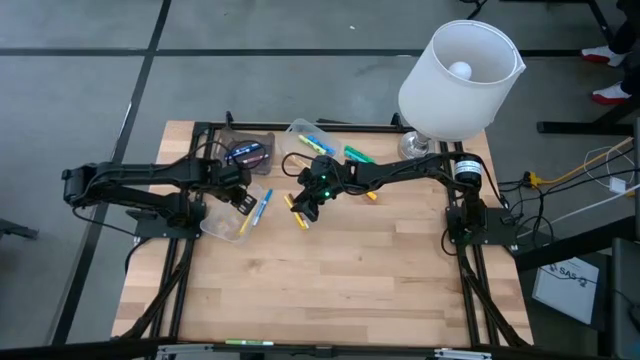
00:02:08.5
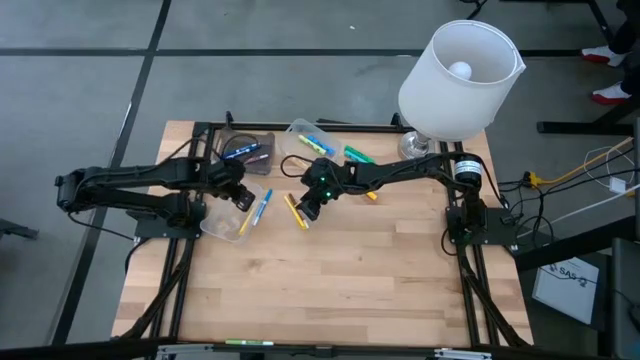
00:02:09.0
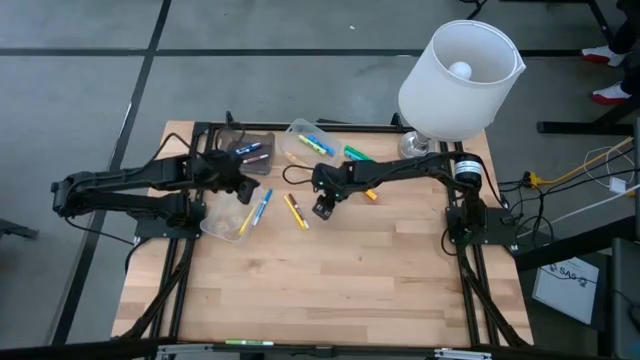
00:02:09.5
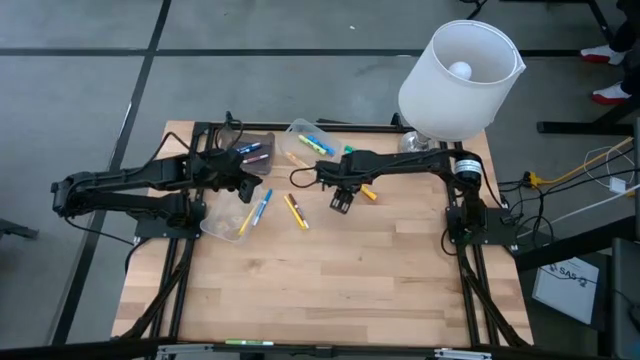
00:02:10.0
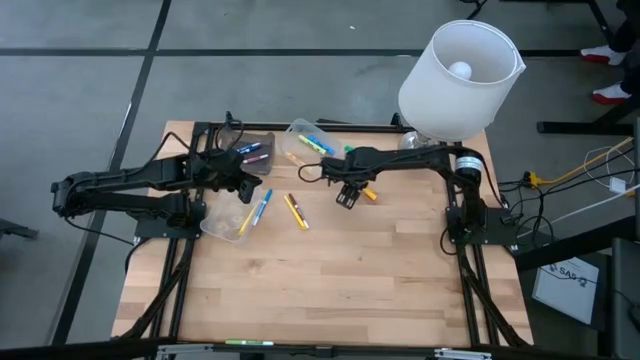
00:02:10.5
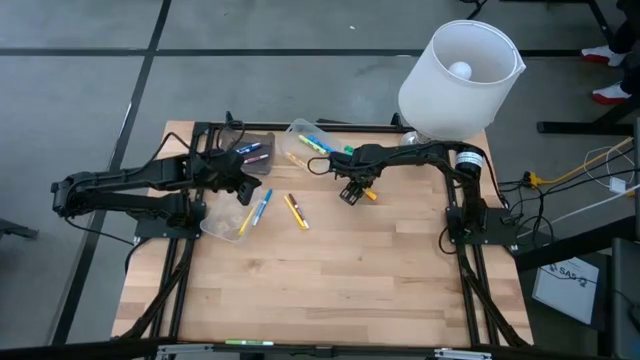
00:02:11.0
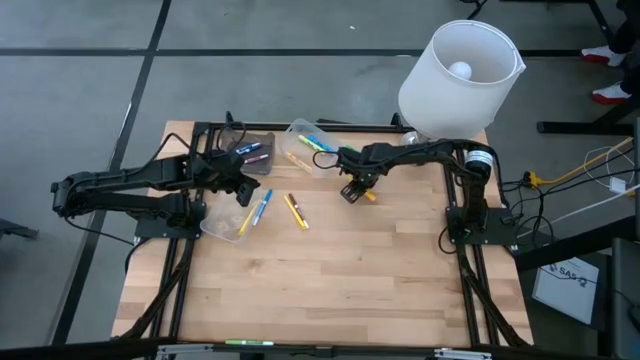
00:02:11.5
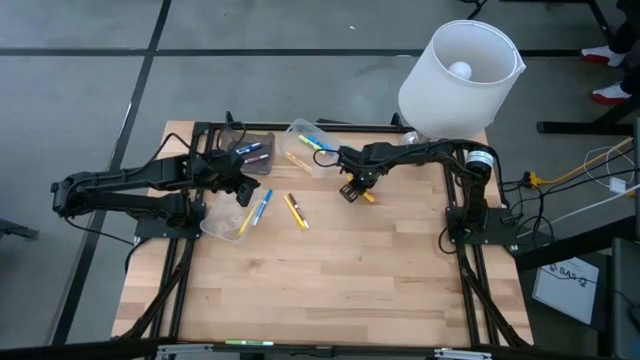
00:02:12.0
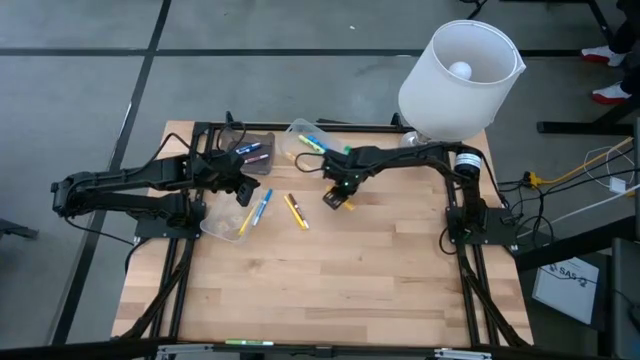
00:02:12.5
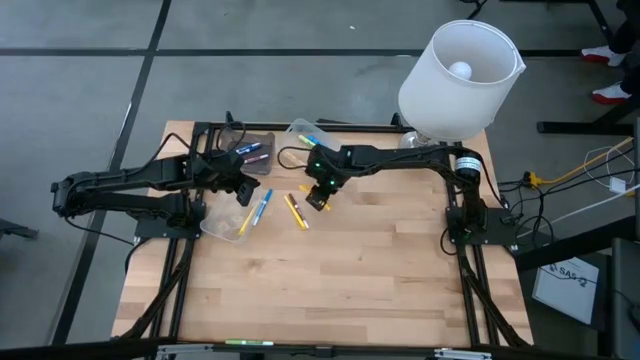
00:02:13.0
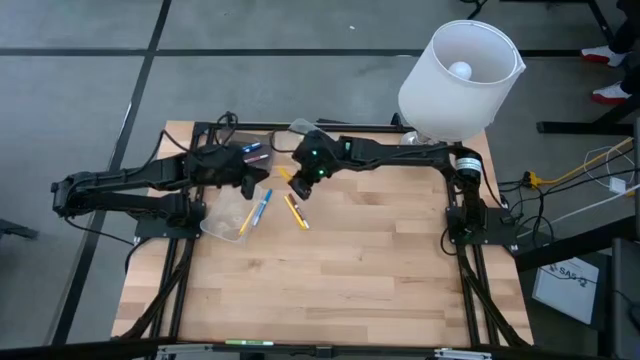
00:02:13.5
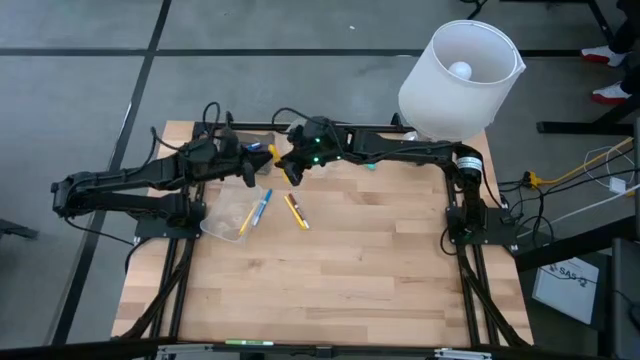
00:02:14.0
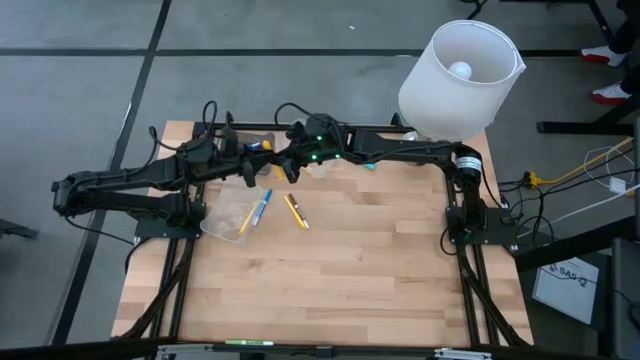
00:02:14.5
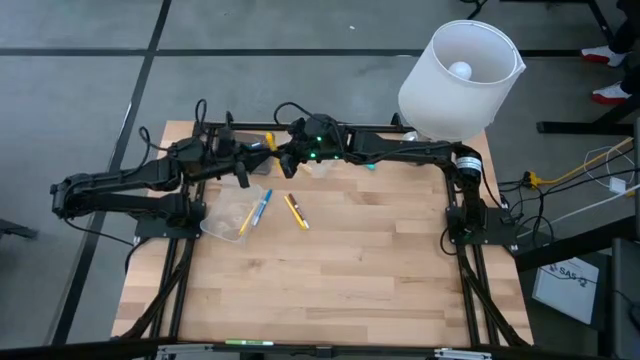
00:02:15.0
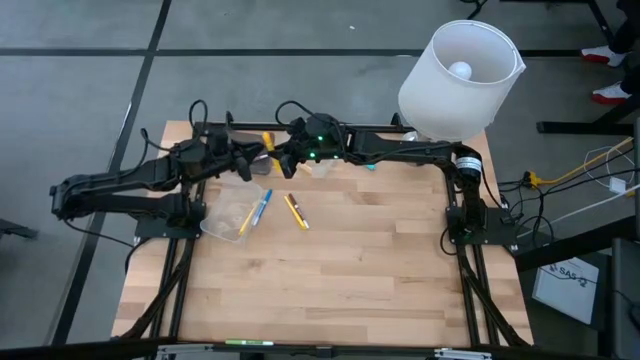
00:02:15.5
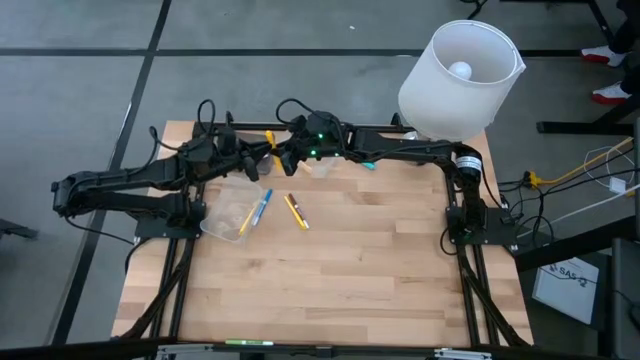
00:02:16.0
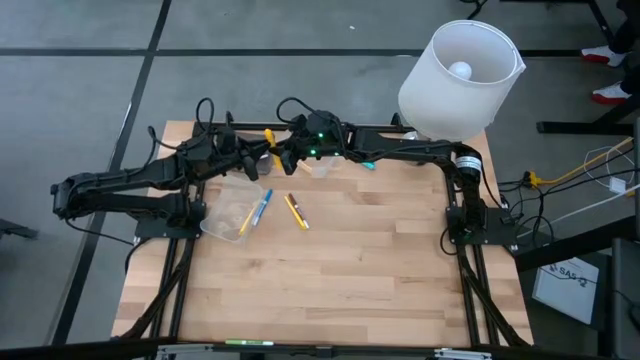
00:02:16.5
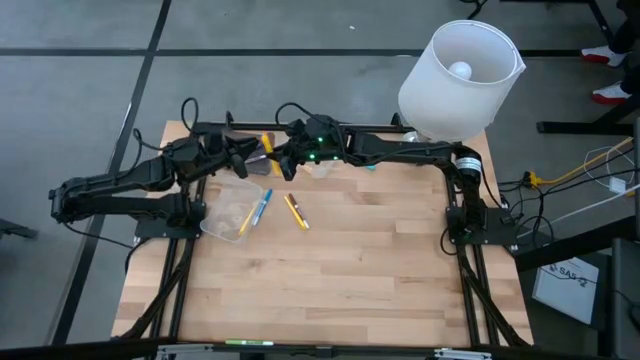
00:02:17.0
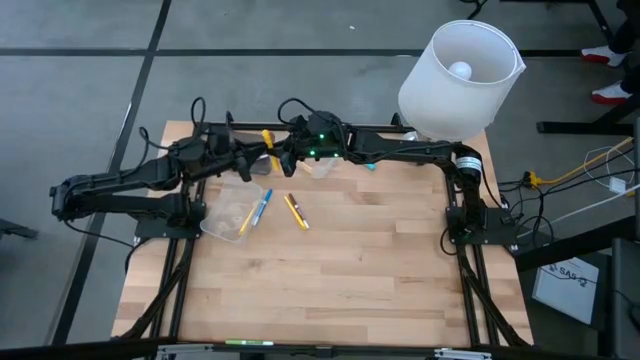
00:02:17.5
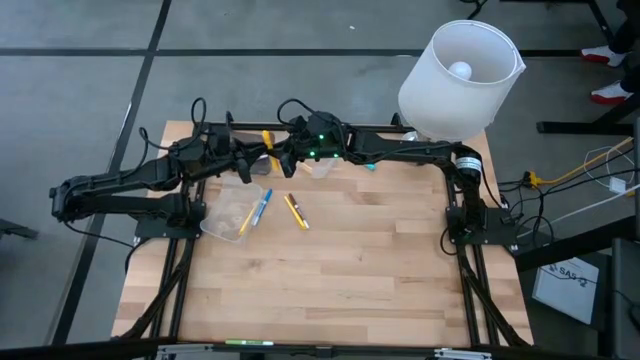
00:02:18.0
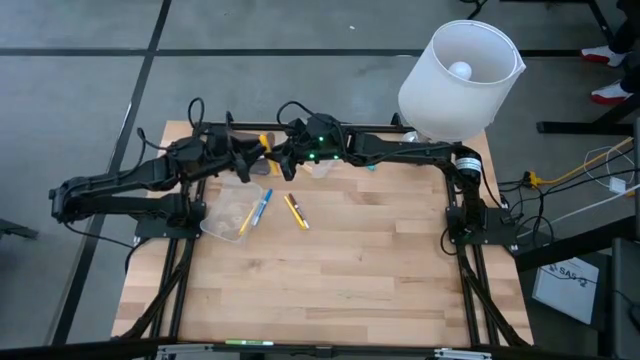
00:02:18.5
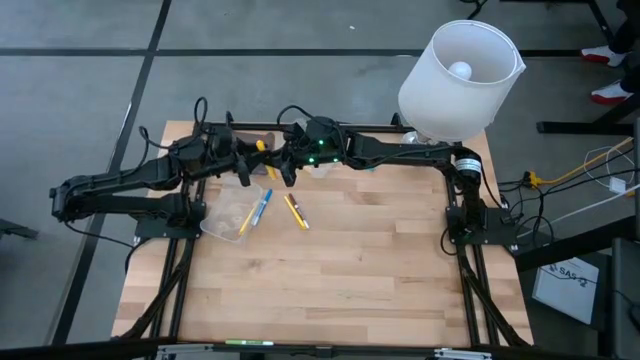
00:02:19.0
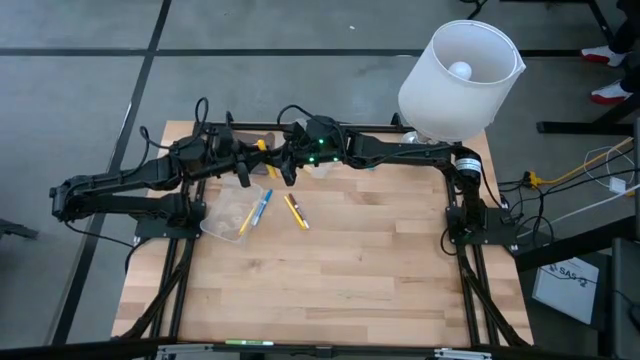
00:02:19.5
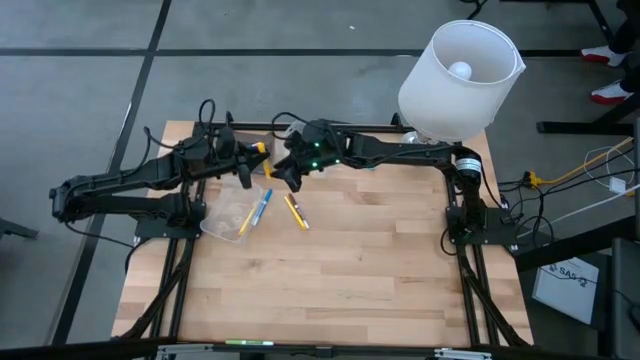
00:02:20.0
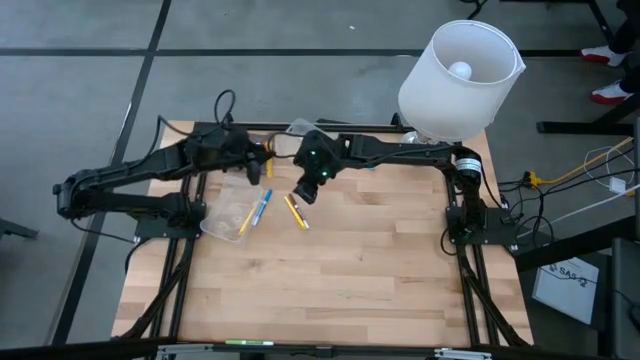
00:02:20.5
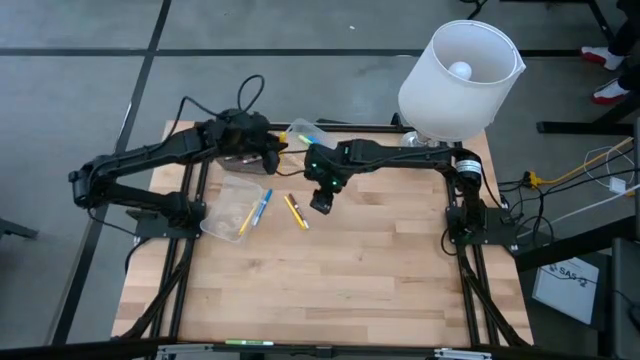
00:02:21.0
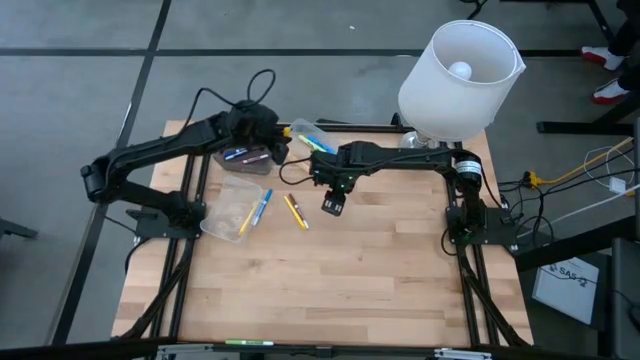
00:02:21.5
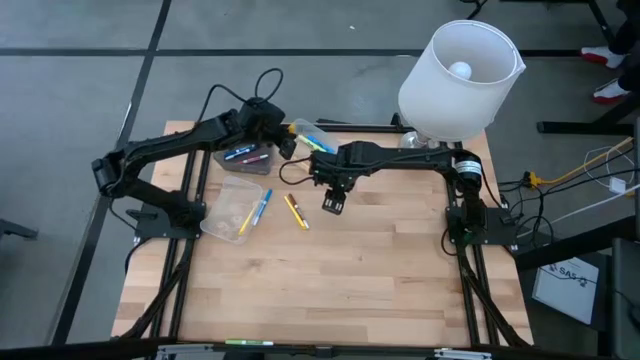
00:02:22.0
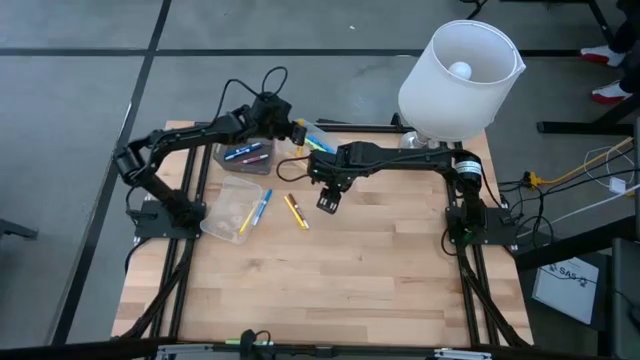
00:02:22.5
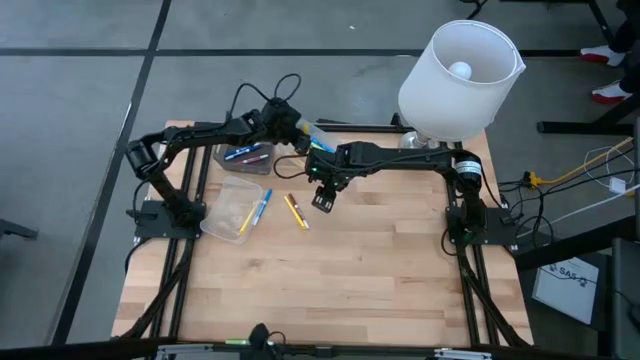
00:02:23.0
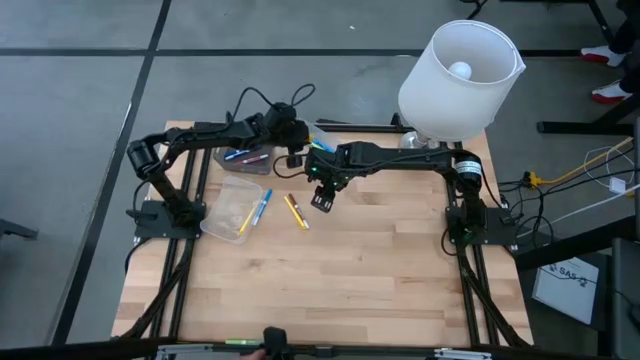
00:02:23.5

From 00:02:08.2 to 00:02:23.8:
Task: Pick & Place Markers
Put the yellow highlighter into the top transparent bin

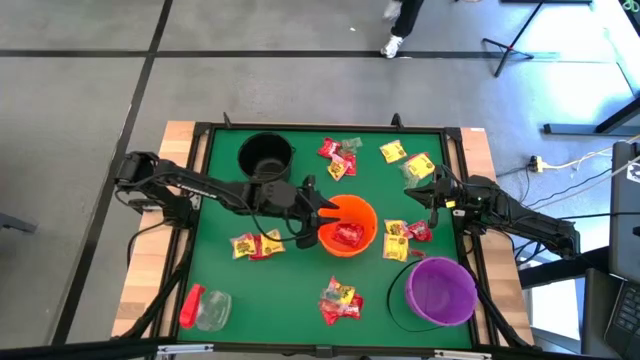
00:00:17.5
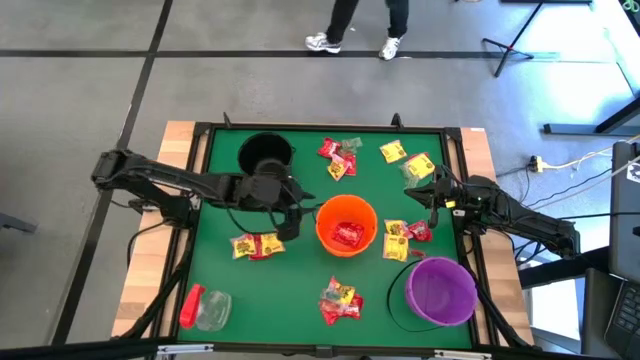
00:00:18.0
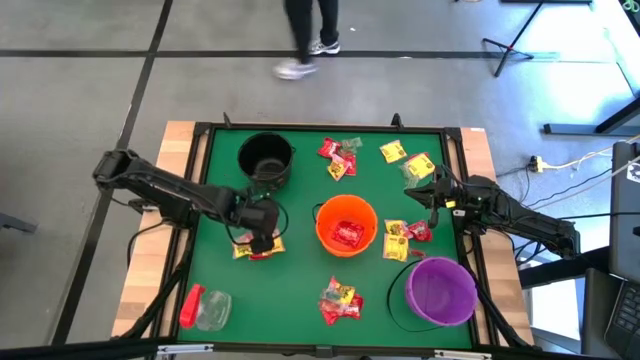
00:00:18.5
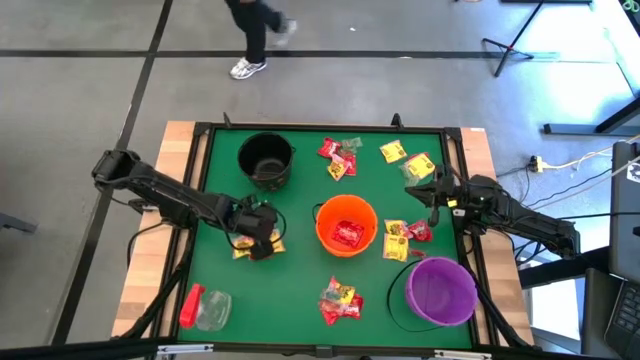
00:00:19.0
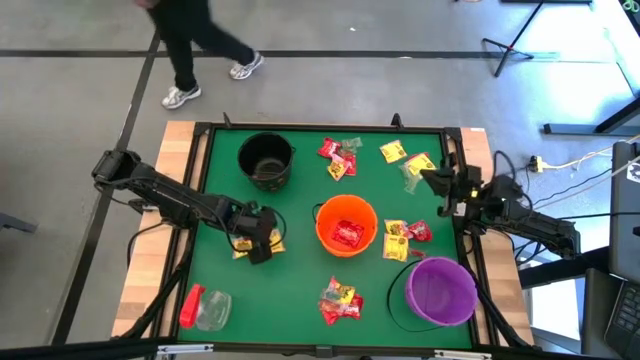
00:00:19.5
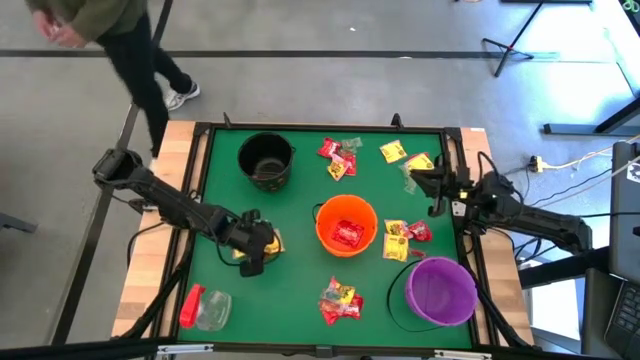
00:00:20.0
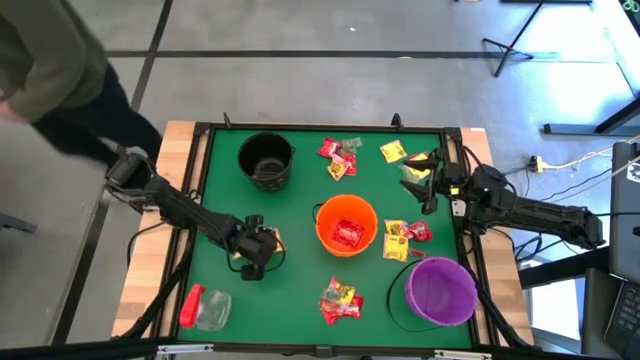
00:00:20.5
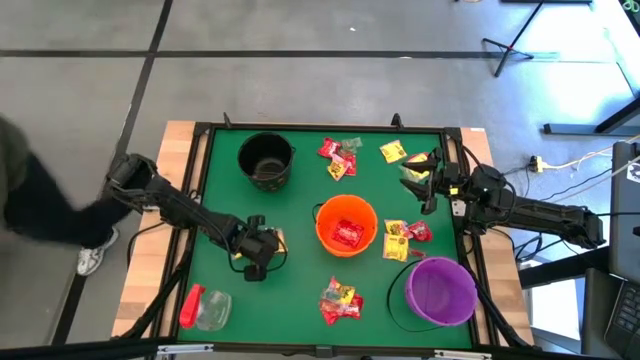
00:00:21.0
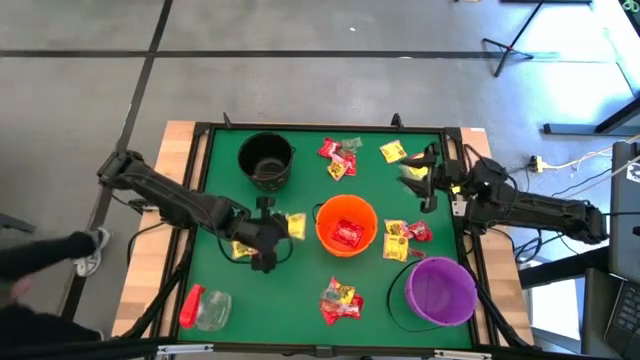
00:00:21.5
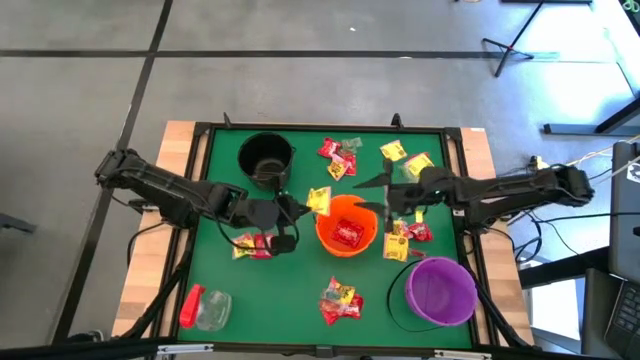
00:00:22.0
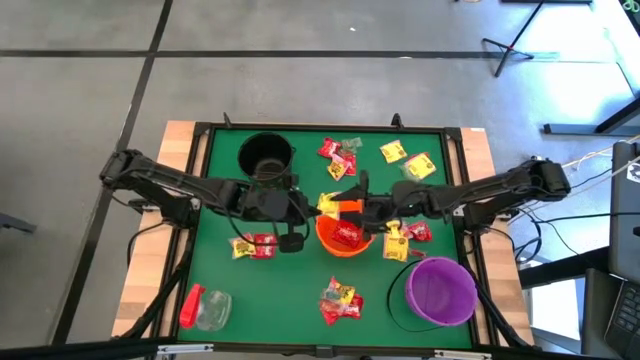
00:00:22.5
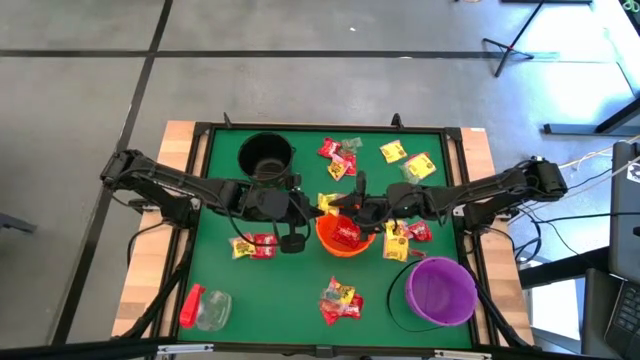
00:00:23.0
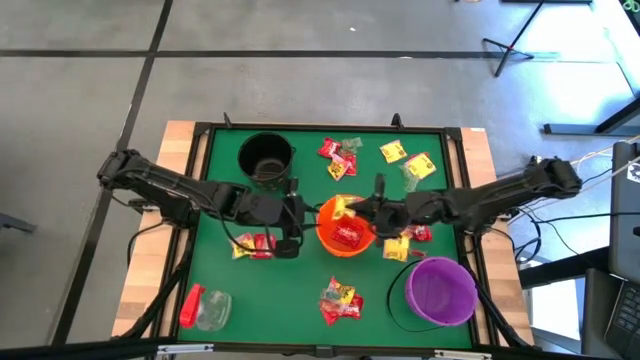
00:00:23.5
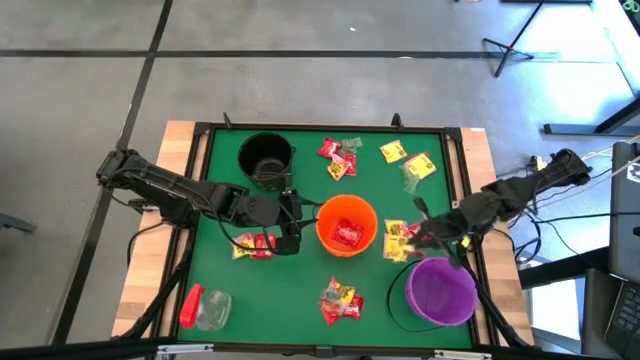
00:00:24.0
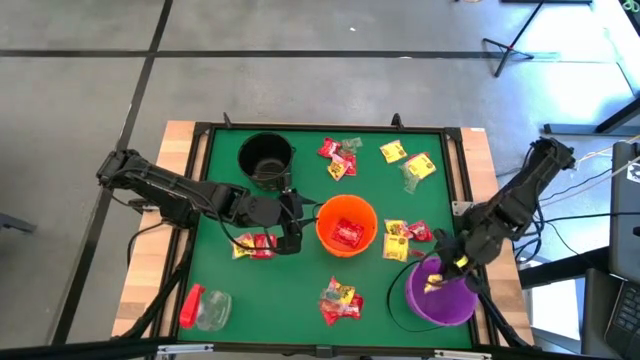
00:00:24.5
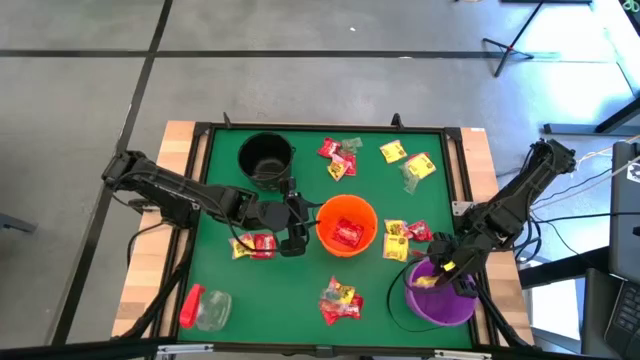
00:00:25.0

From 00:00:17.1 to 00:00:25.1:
Task: Sort candy
Put the yellow candy into the purple bin
